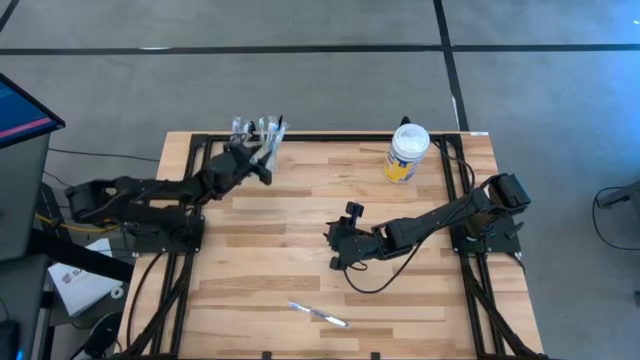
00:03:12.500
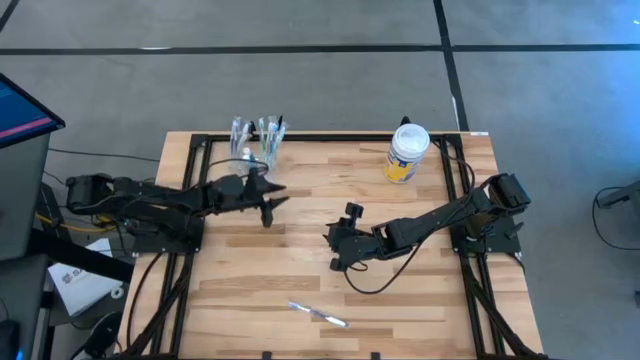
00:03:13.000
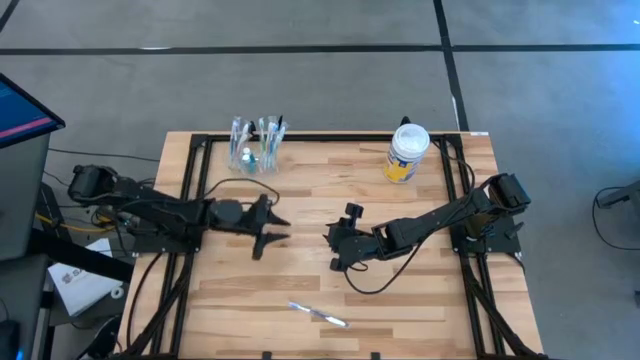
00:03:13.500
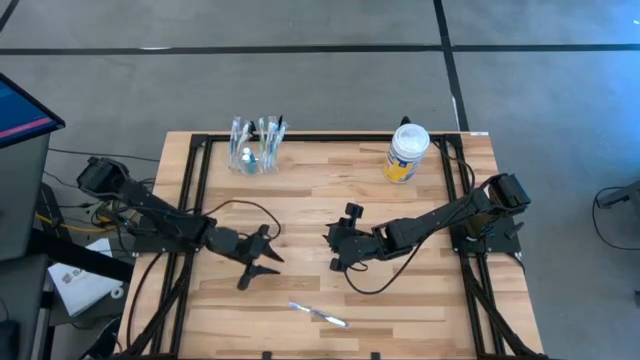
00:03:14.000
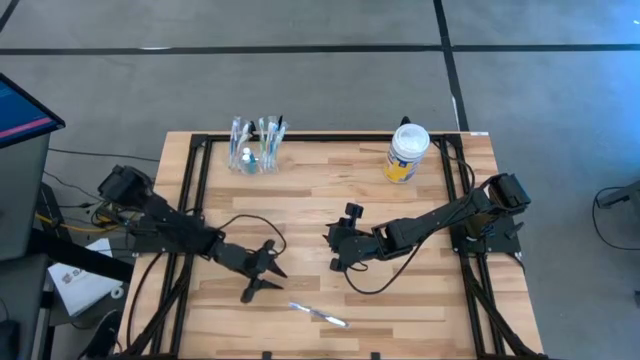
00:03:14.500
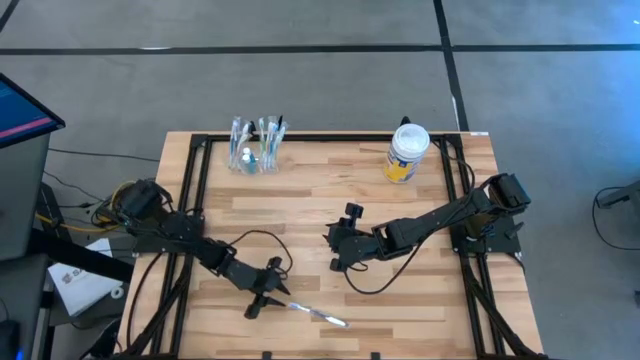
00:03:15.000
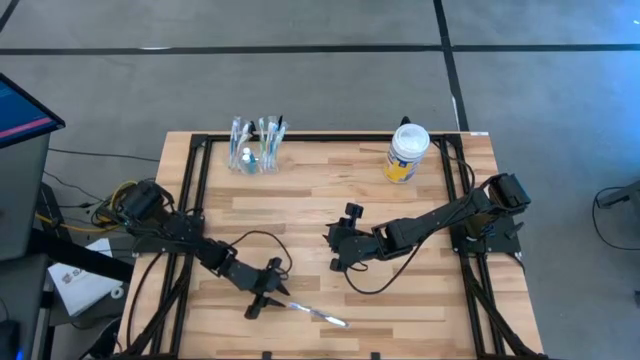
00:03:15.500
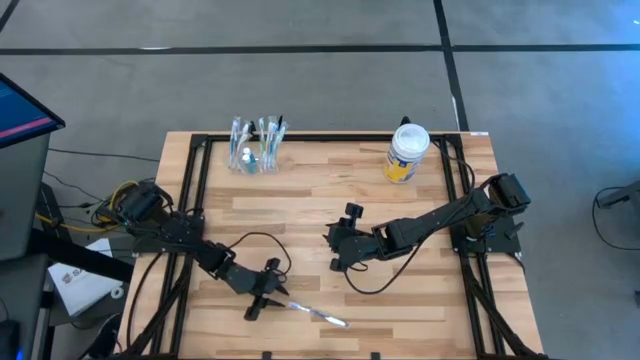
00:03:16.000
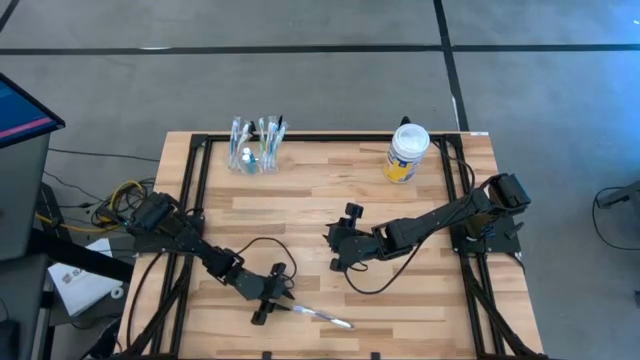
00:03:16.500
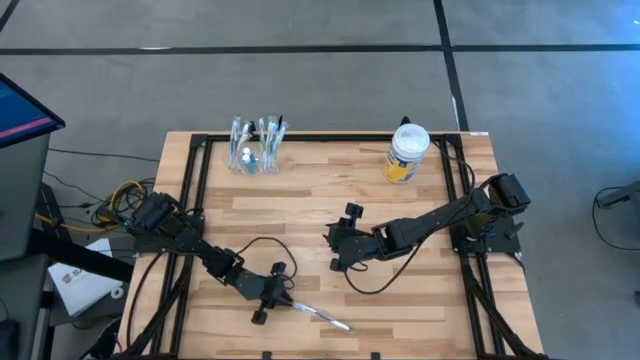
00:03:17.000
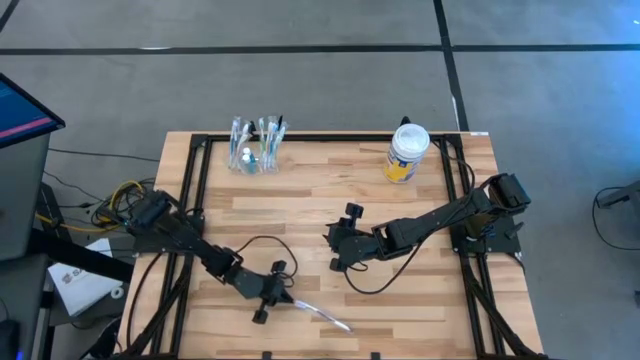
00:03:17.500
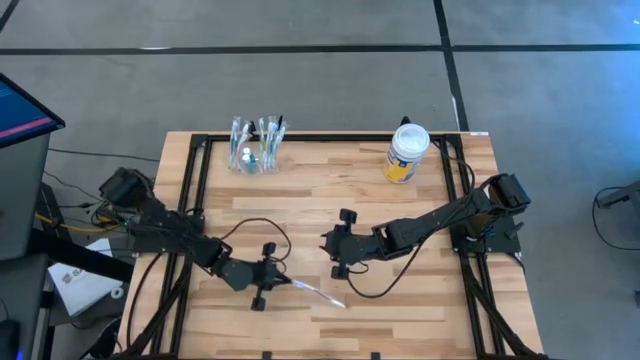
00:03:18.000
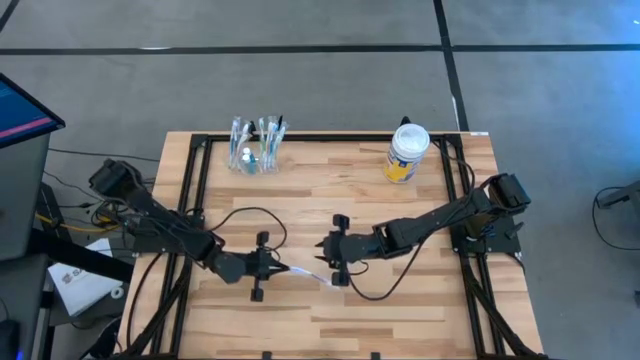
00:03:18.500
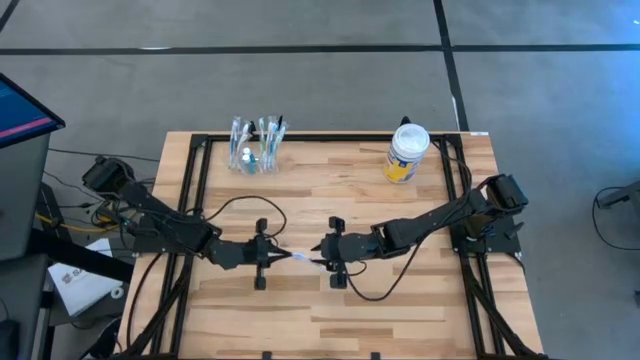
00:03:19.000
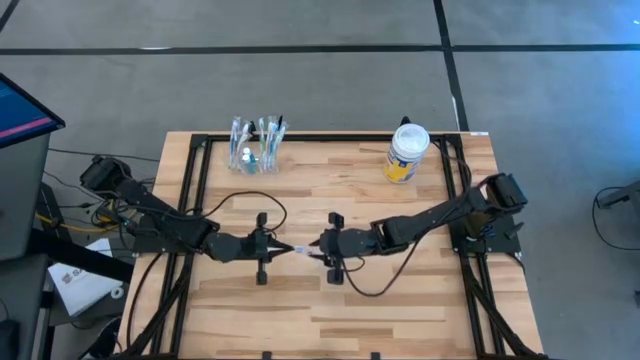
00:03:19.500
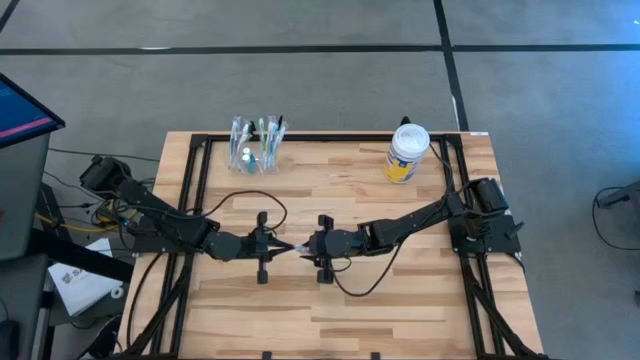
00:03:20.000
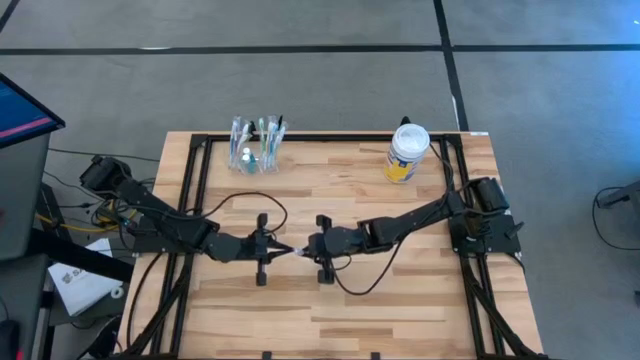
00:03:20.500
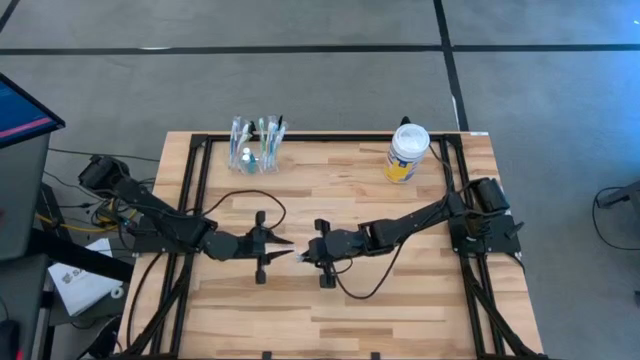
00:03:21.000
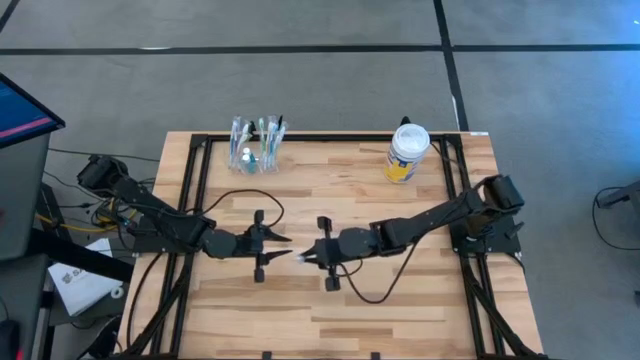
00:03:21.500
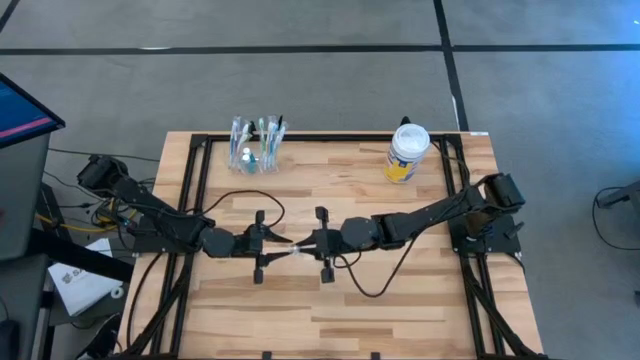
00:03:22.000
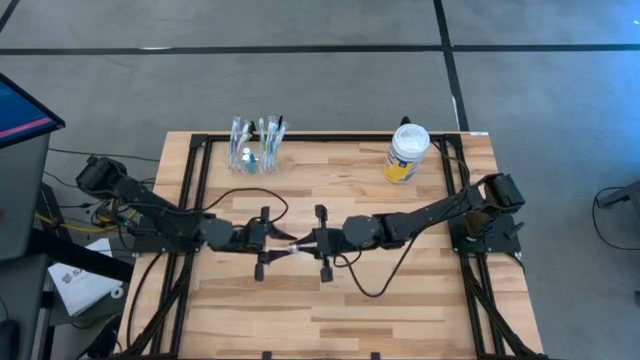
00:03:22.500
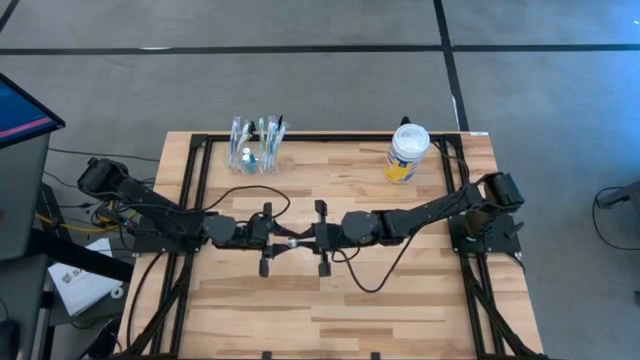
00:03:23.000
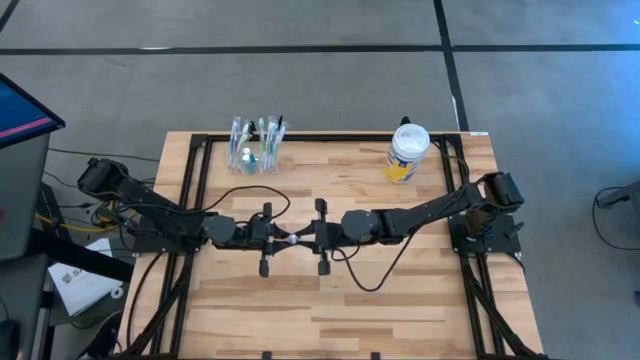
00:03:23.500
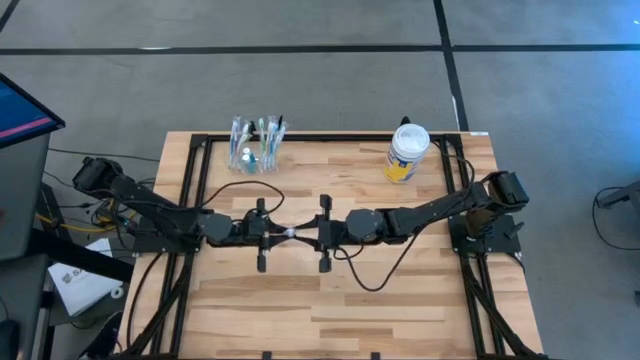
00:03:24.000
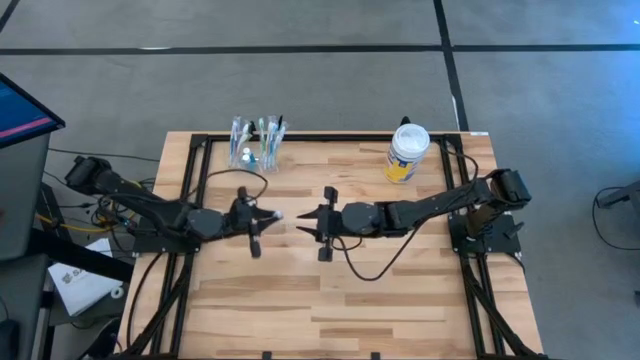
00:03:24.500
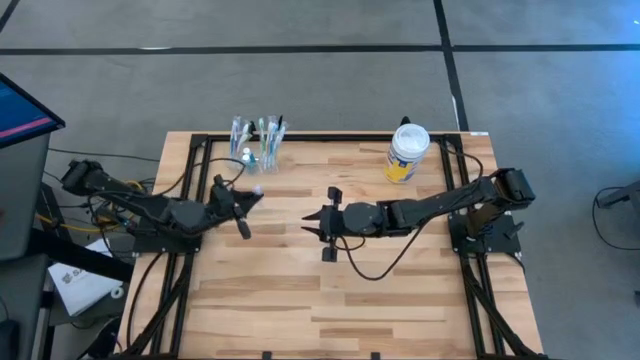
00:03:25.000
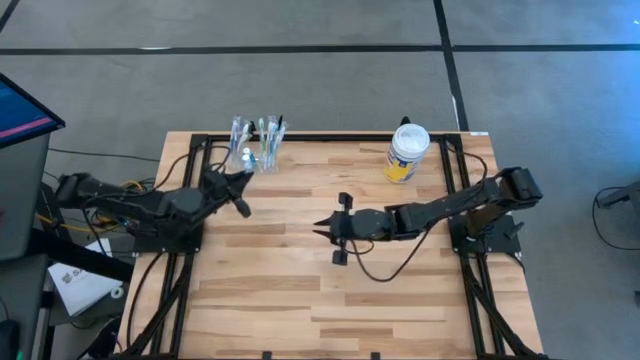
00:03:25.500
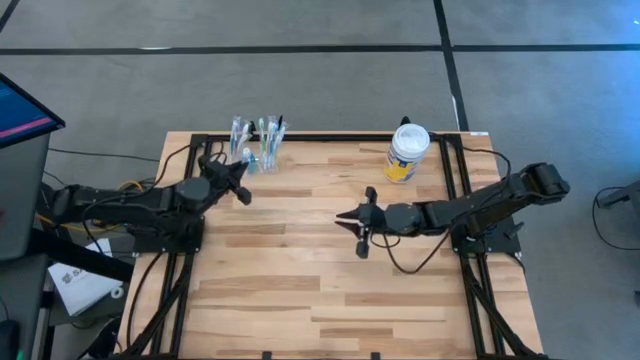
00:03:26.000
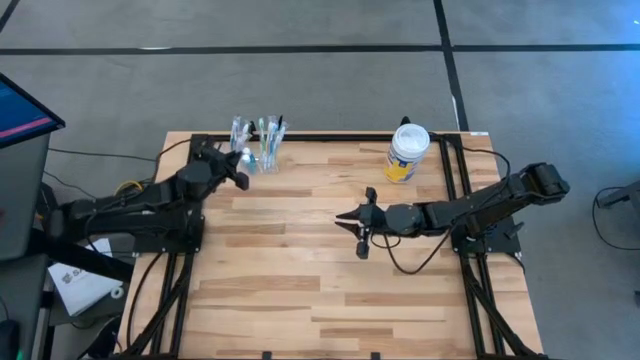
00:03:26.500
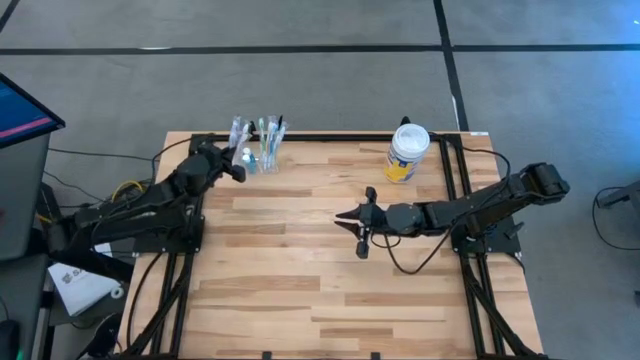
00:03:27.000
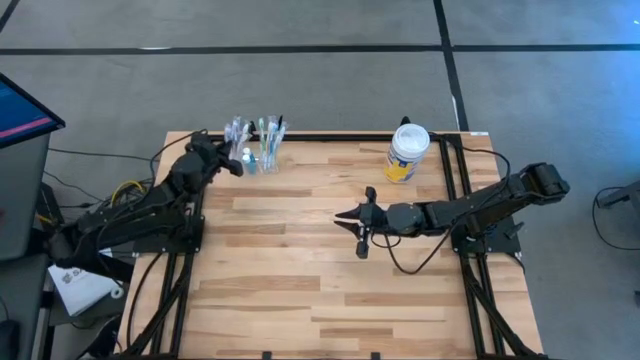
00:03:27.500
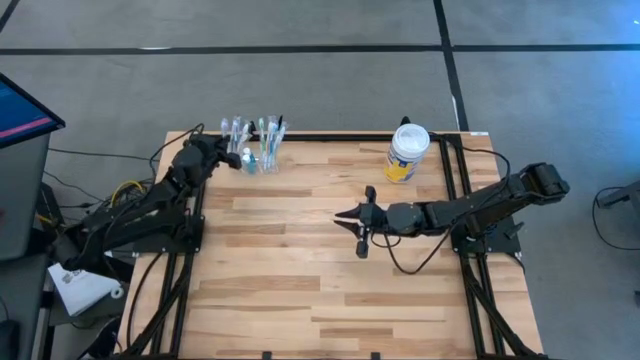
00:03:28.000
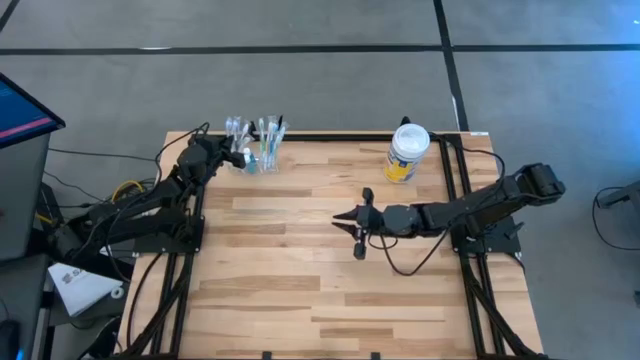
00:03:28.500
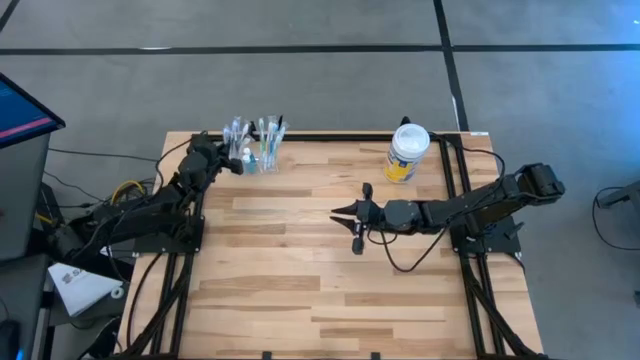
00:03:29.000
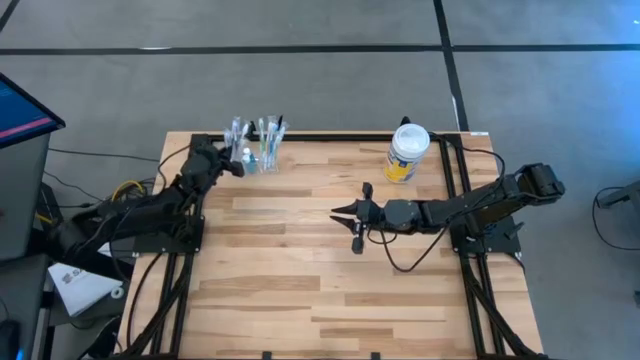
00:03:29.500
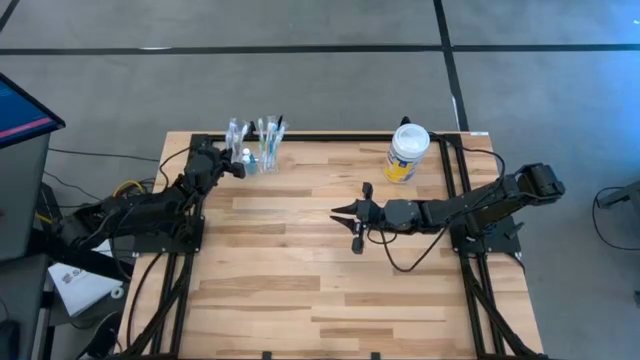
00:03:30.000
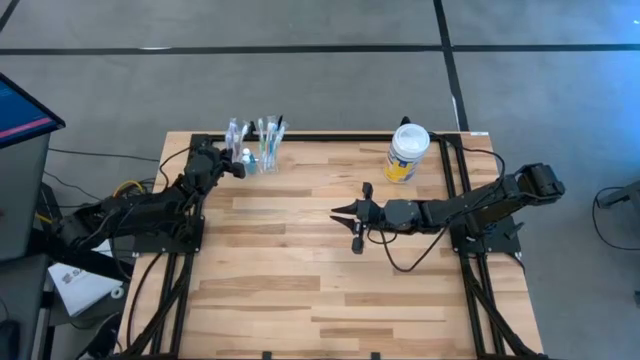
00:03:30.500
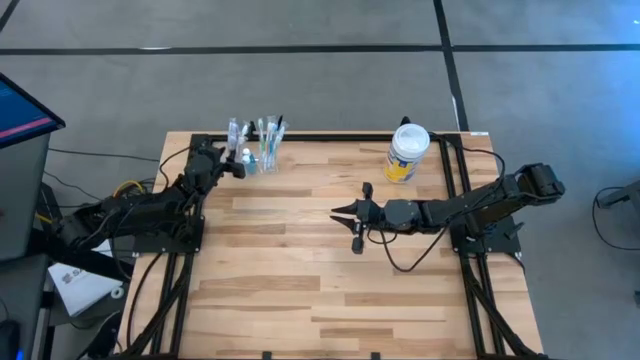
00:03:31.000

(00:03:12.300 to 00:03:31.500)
Task: Pick & Place toothbrushing station
Put the purple toothbrush into the transparent organizer
